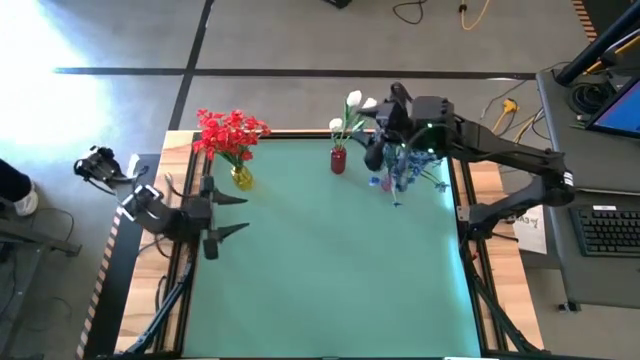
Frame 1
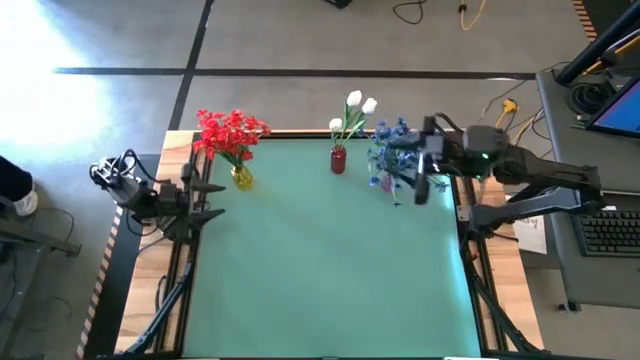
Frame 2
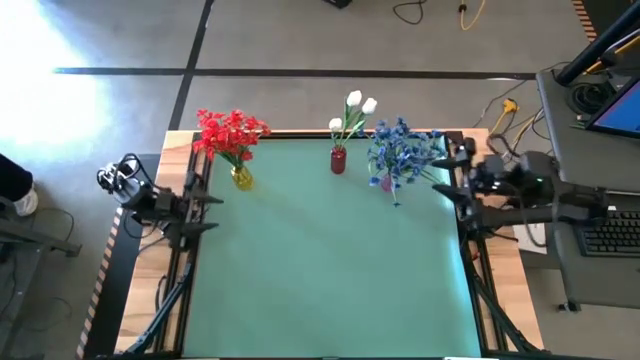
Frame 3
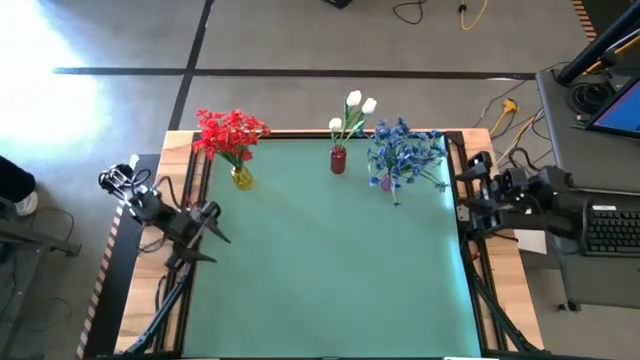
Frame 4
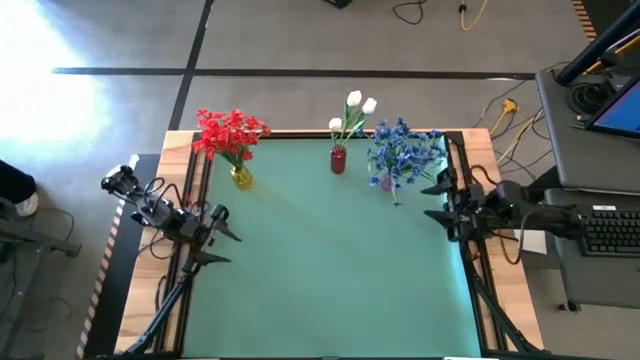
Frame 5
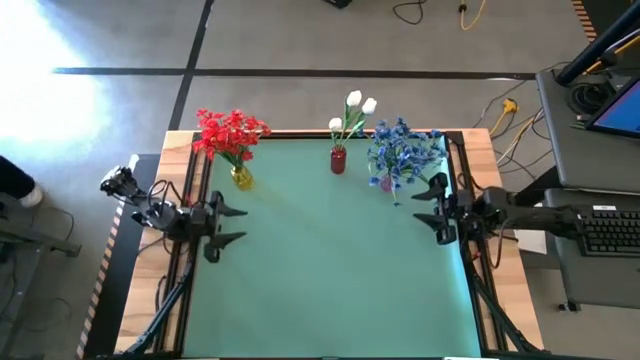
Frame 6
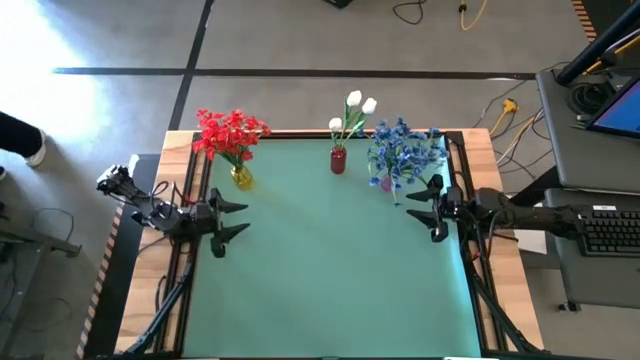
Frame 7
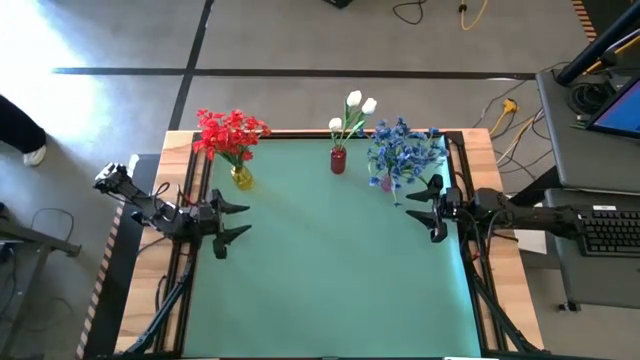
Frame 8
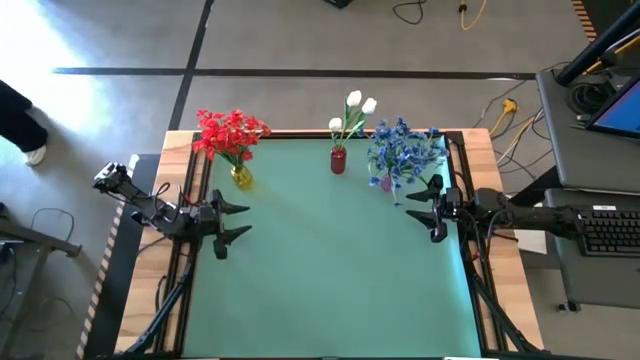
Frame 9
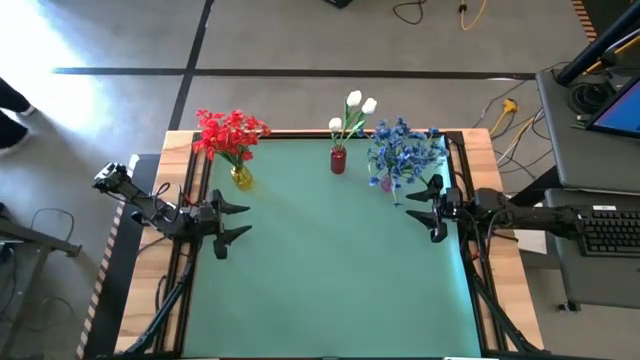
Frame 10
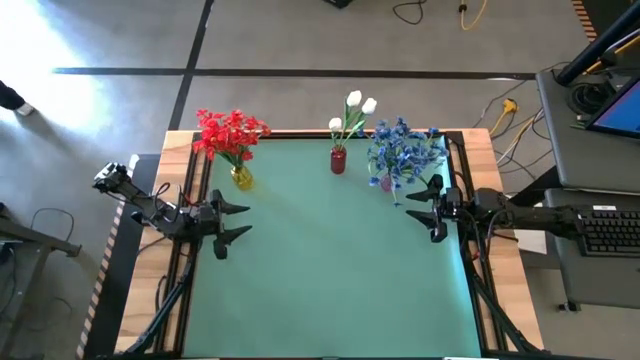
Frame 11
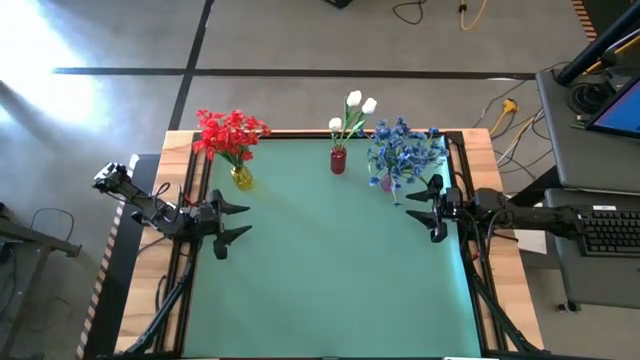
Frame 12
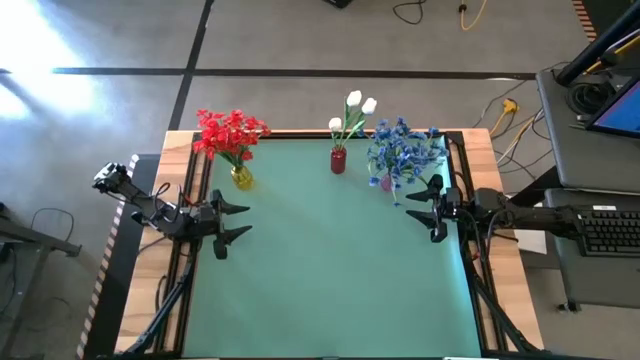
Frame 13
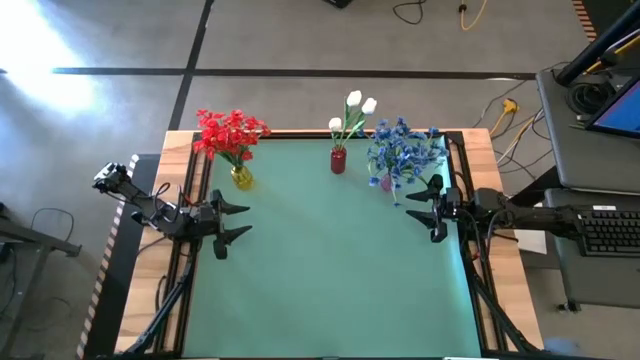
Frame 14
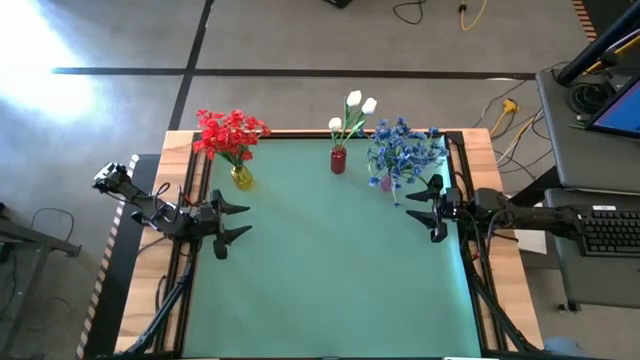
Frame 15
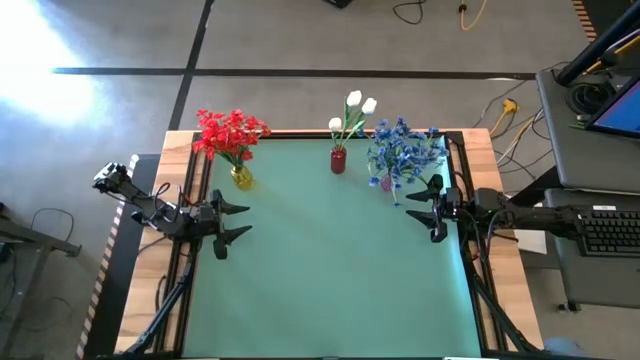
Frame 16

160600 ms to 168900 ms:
Task: Sort flowers into vase by color
Return to Home Position
